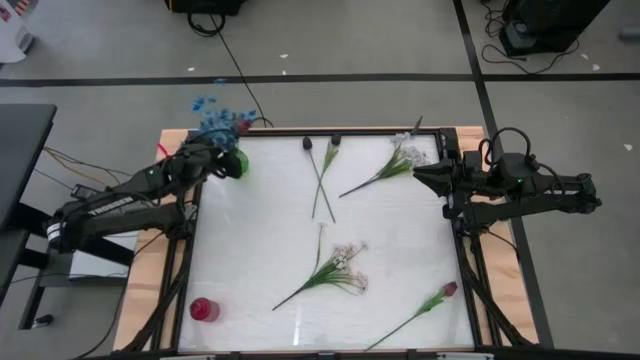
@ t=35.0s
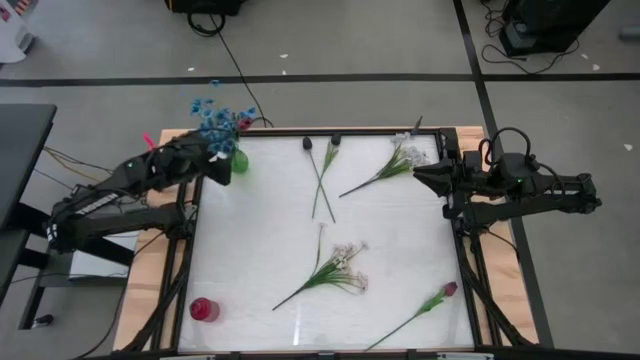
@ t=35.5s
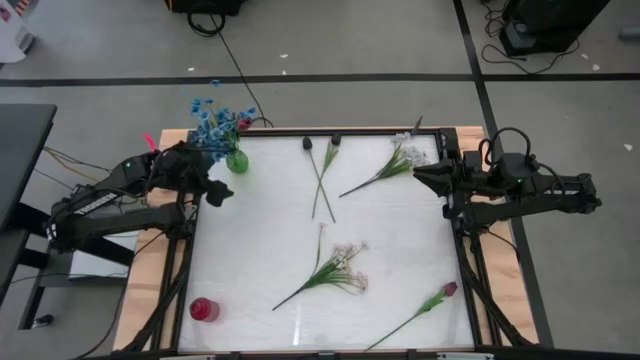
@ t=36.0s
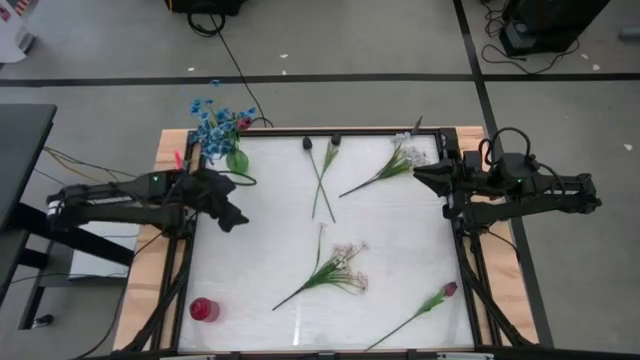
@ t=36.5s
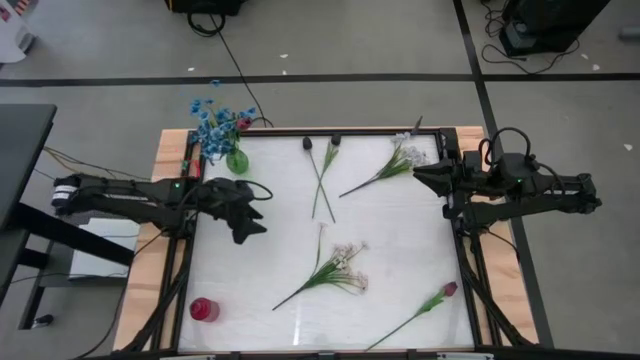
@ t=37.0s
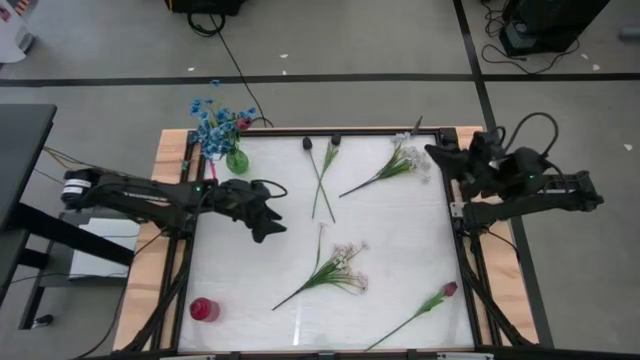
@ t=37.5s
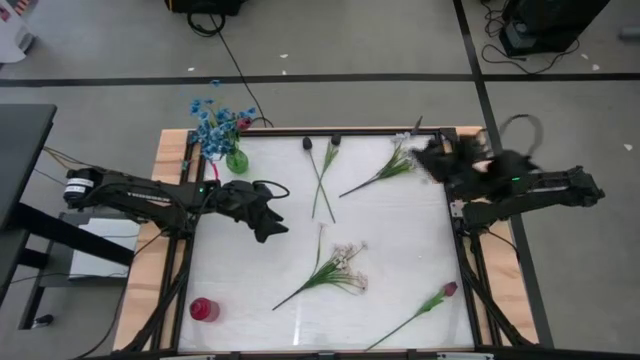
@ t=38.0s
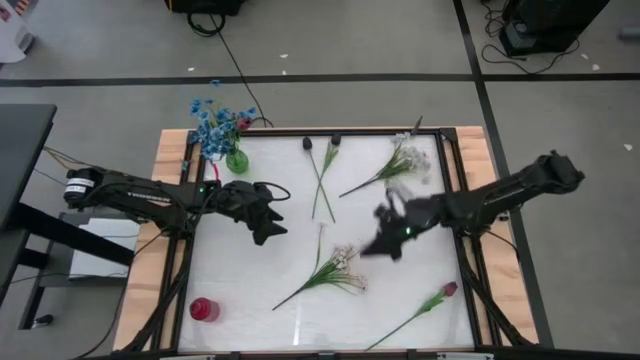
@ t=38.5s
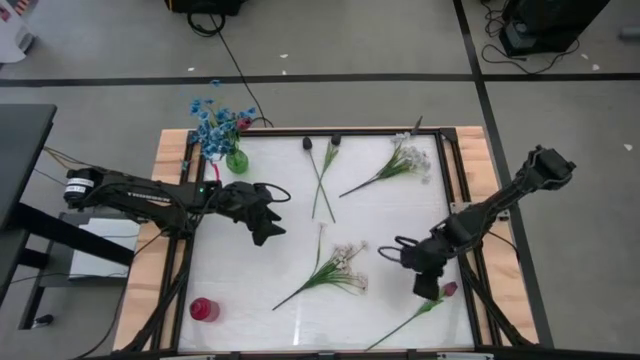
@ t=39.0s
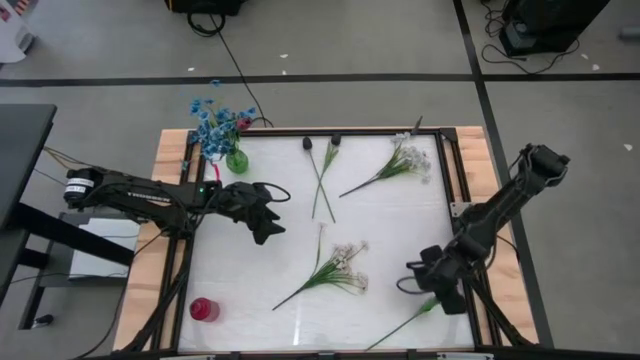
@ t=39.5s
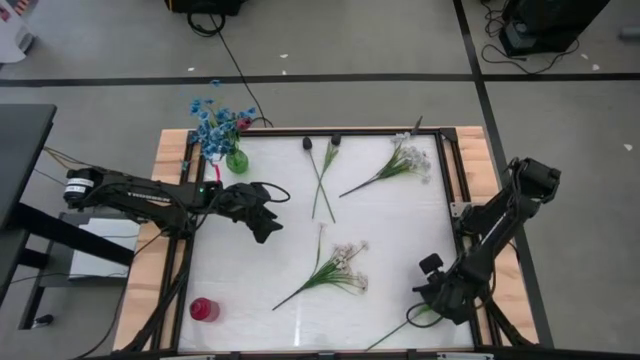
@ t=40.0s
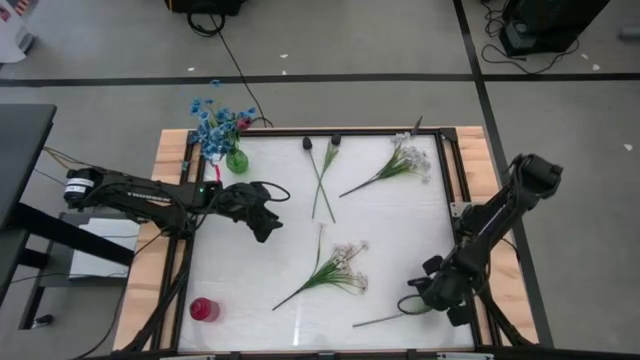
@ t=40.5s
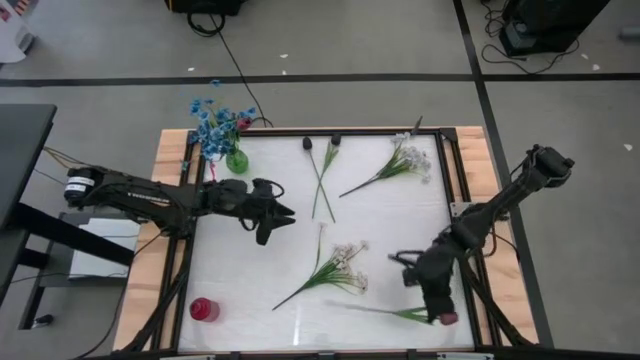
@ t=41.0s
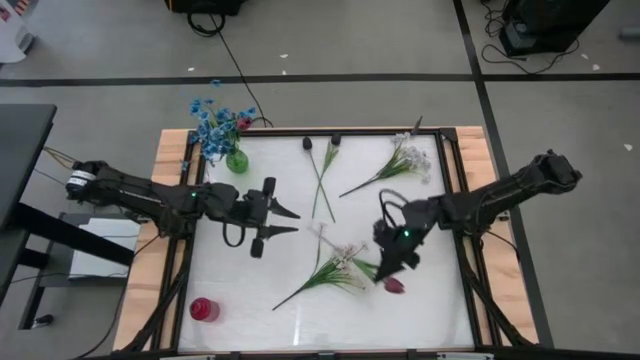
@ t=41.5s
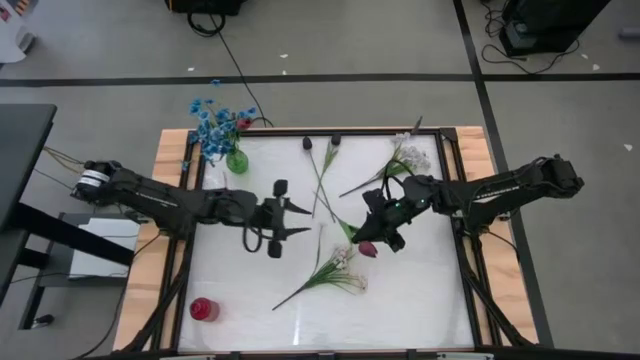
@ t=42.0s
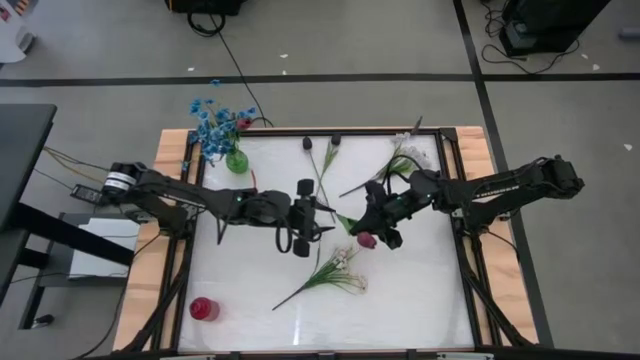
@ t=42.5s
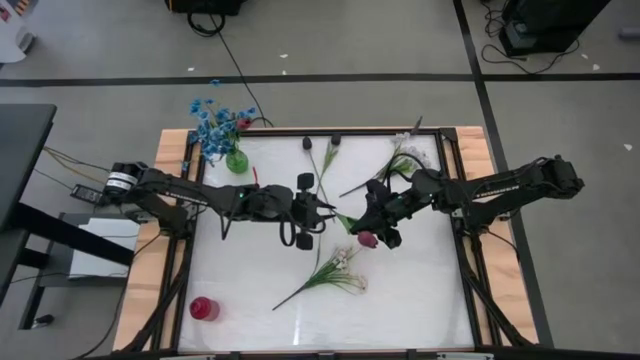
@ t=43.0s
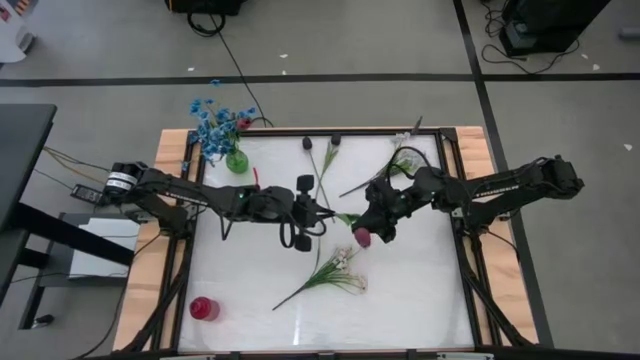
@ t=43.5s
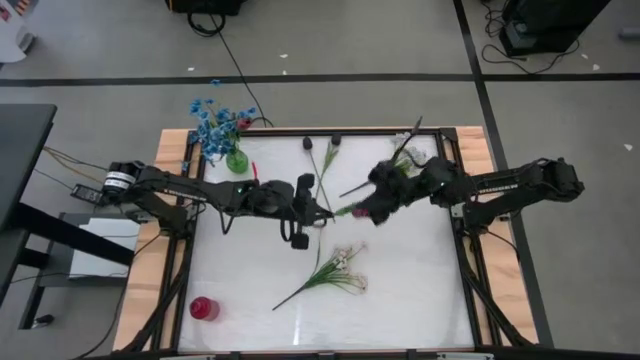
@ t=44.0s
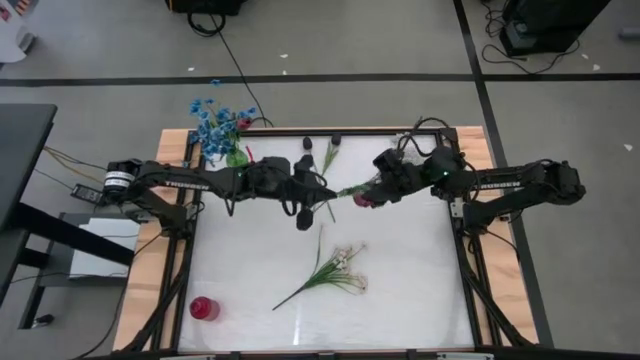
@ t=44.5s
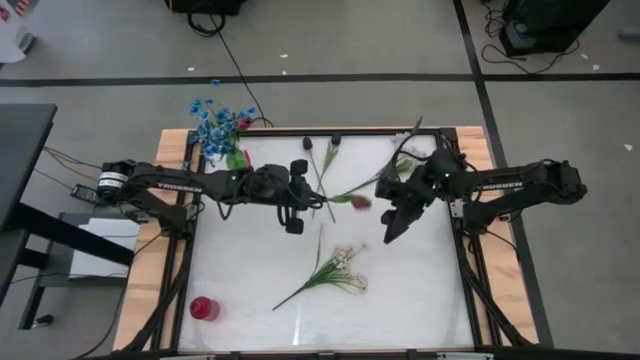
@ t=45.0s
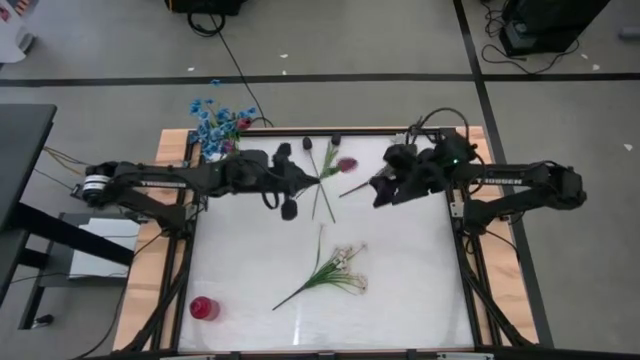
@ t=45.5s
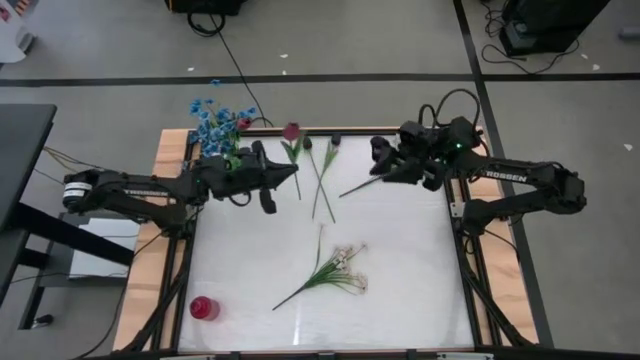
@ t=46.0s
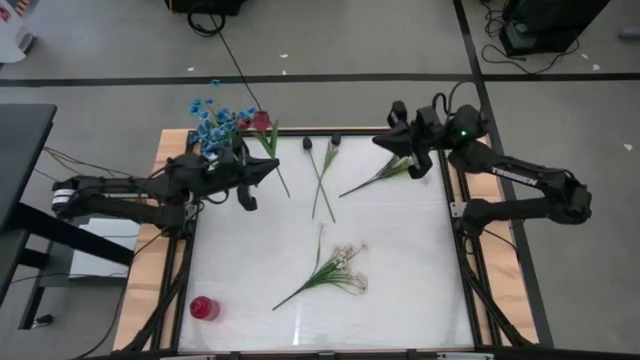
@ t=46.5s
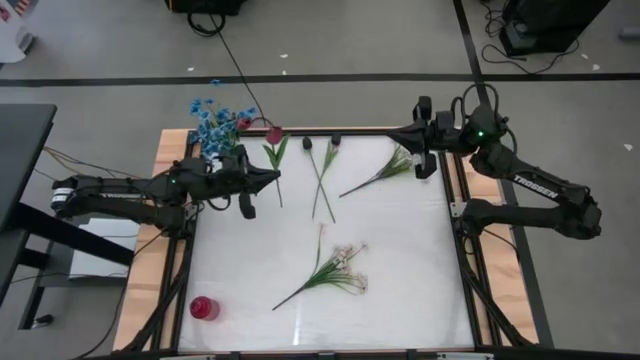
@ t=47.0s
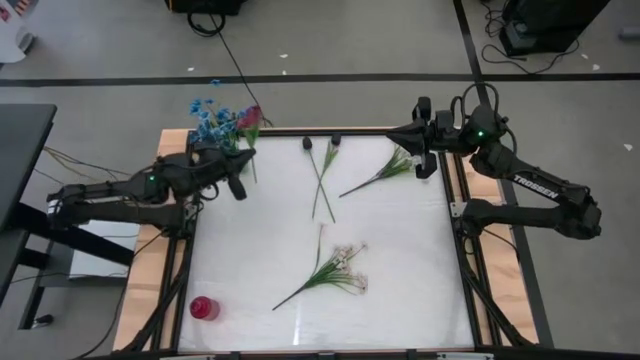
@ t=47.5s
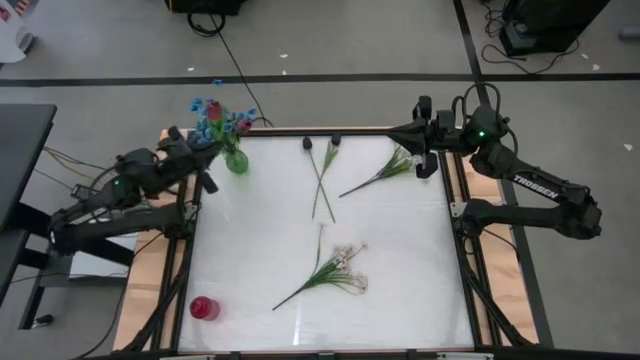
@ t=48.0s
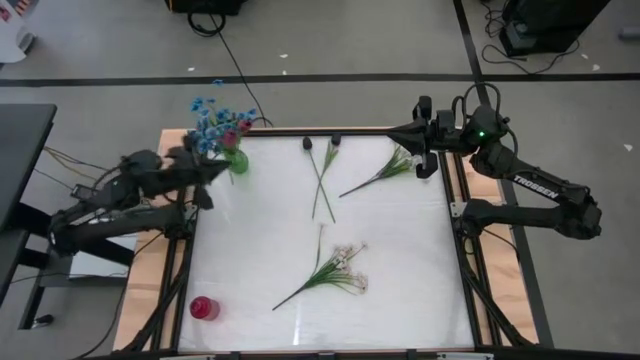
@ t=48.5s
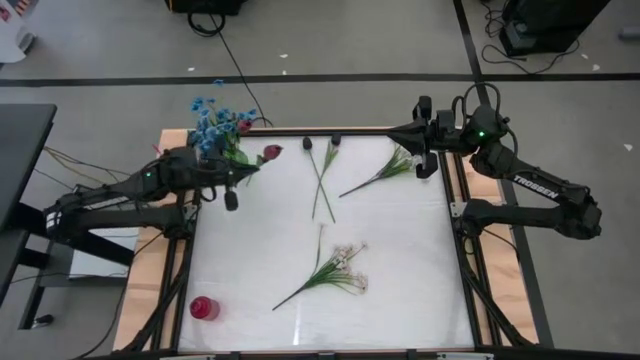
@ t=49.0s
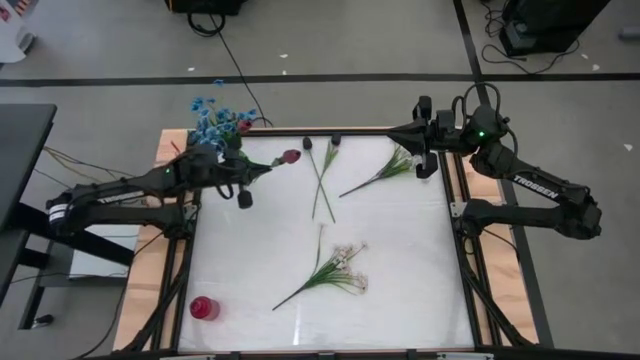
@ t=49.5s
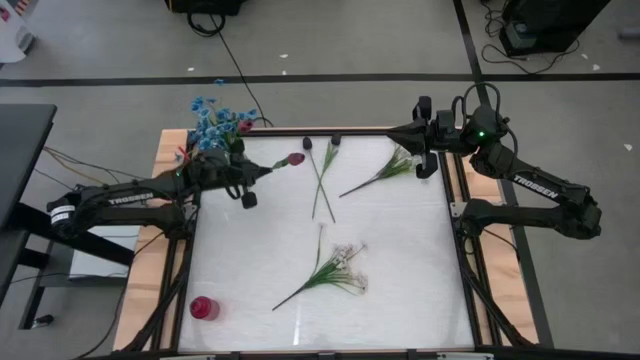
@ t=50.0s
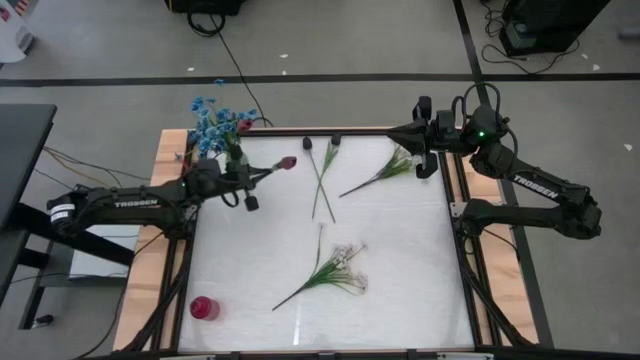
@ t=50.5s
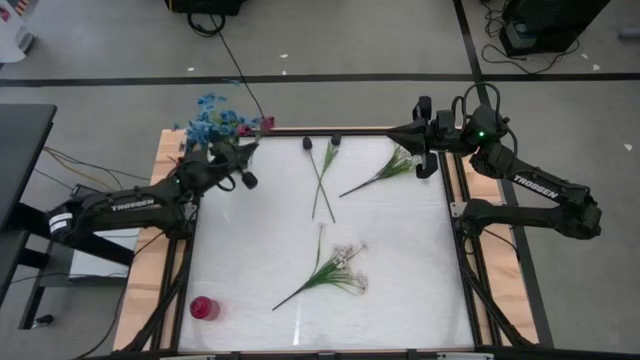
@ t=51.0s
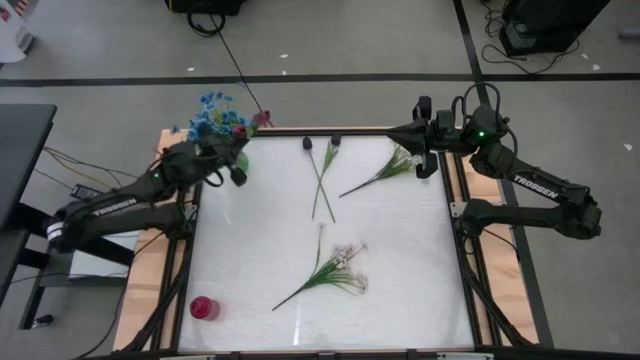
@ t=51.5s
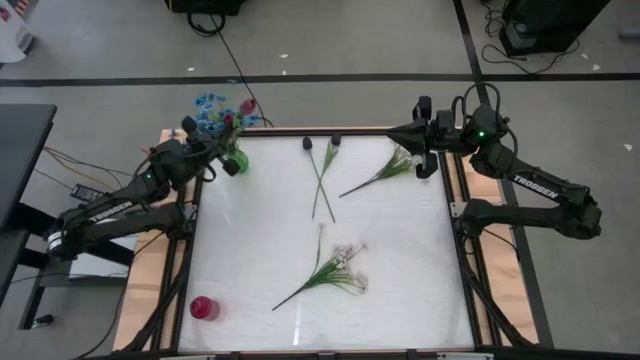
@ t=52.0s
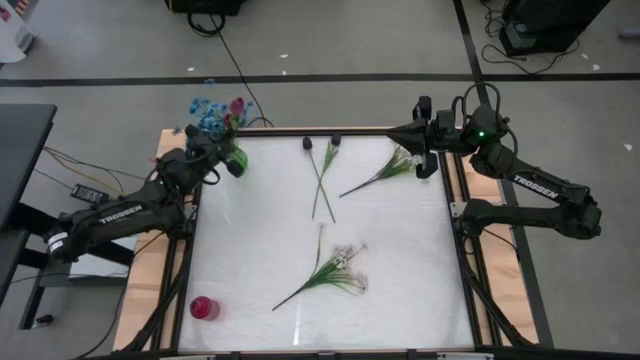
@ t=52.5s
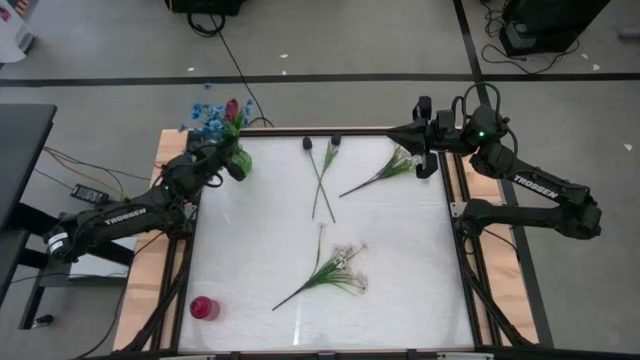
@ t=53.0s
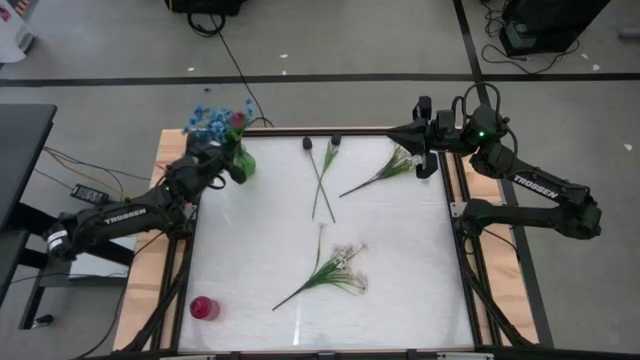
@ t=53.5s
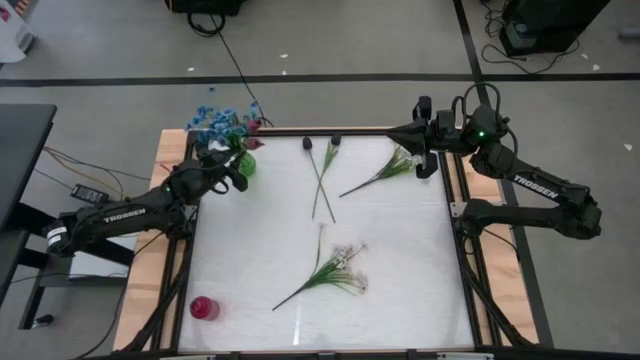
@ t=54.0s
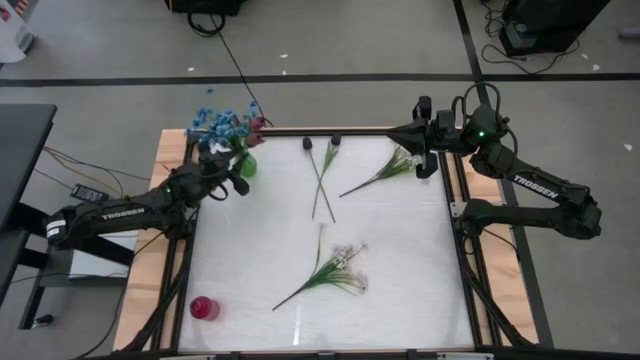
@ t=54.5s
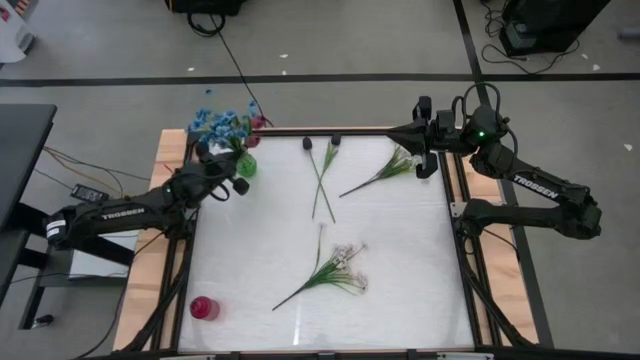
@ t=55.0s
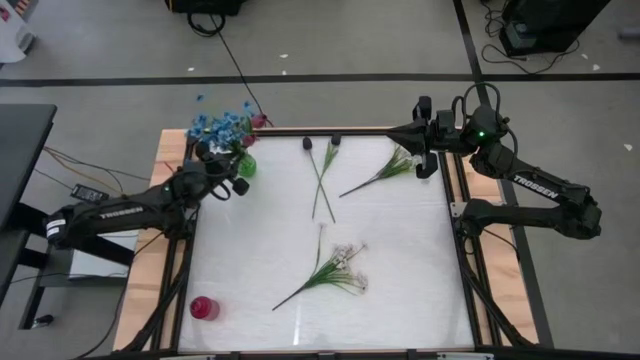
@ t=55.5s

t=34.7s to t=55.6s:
Task: Sort flowers into vase by color
Put the pink flower into the green vase

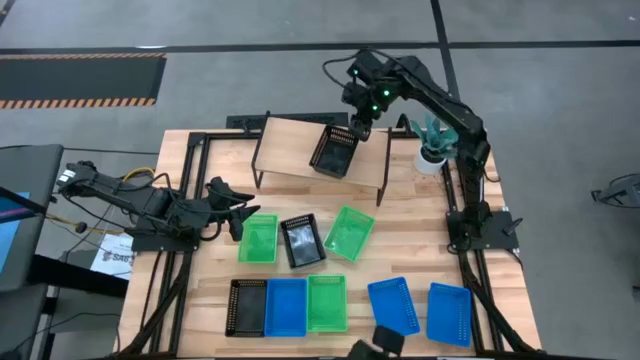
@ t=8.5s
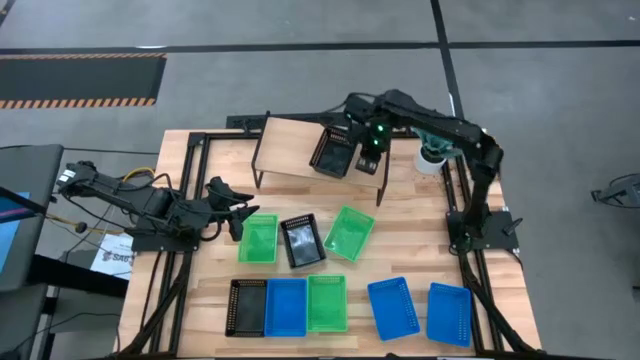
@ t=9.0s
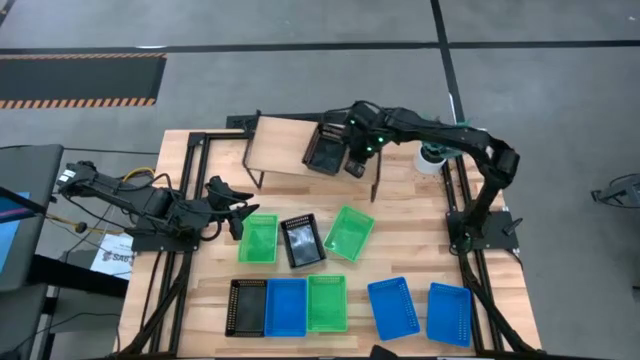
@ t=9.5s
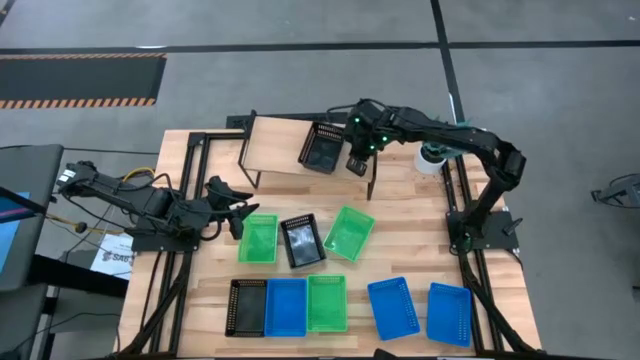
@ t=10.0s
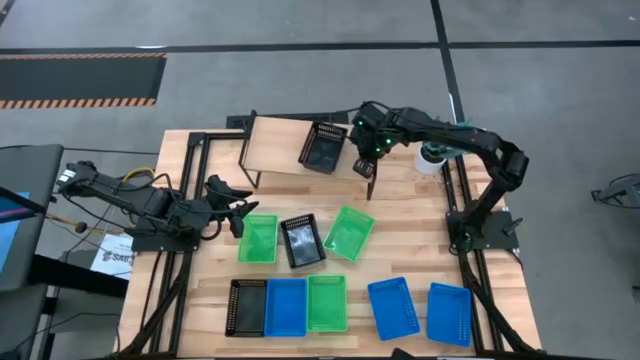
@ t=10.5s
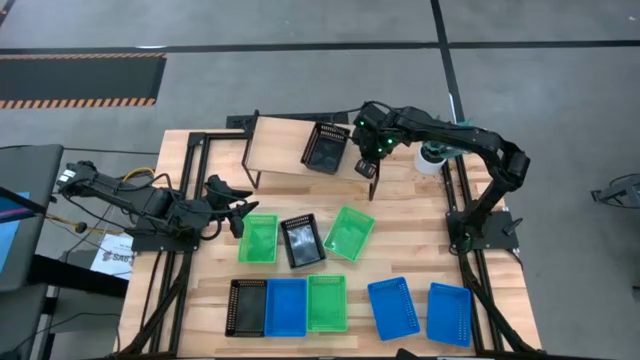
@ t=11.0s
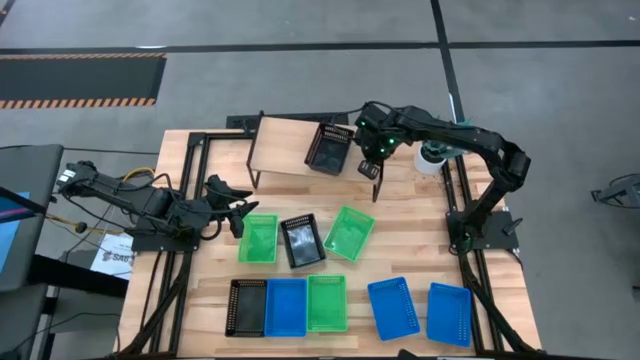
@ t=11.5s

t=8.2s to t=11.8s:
Task: Stack baskets on shelf by color
Adjust the shelf
